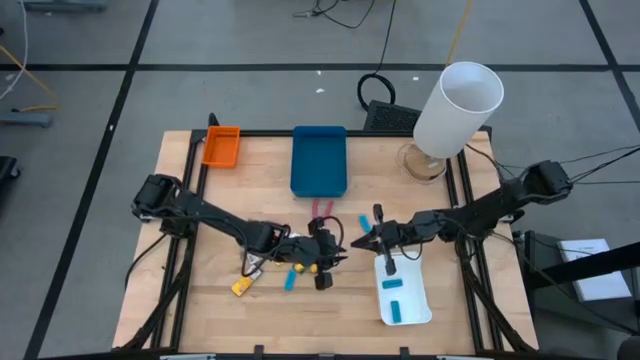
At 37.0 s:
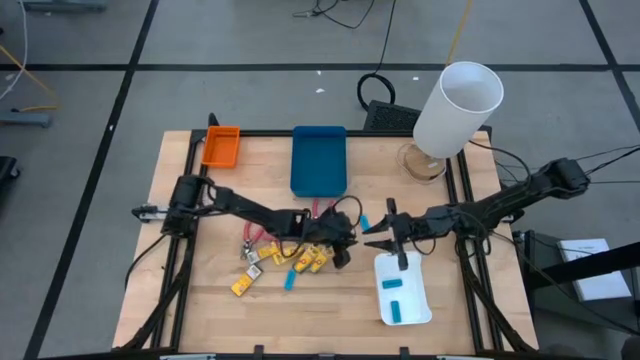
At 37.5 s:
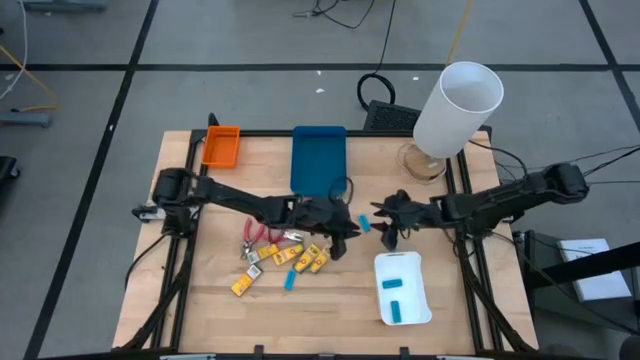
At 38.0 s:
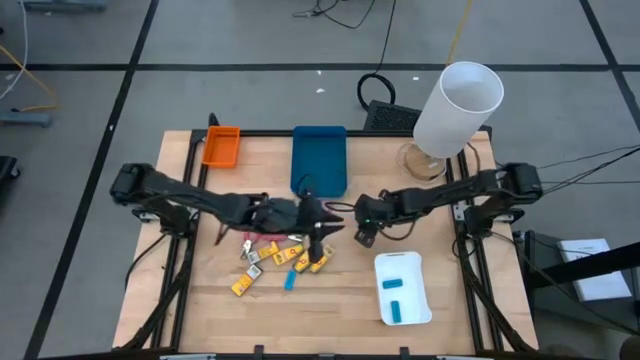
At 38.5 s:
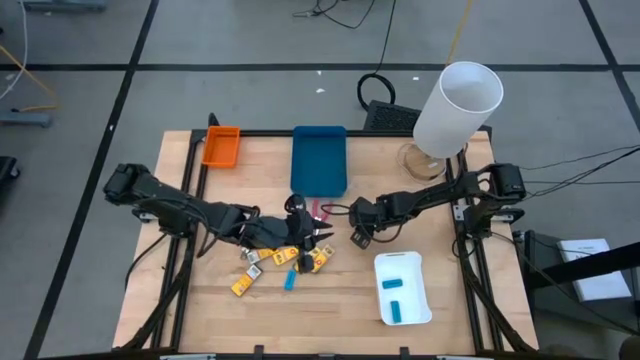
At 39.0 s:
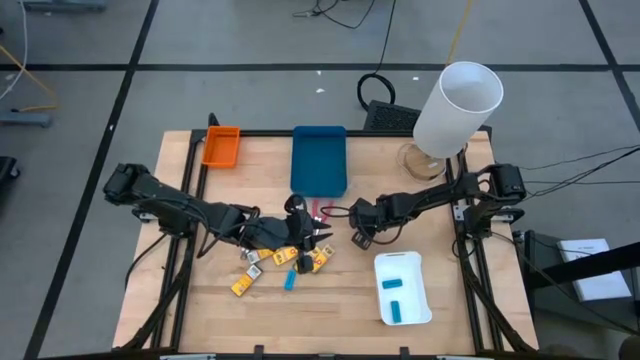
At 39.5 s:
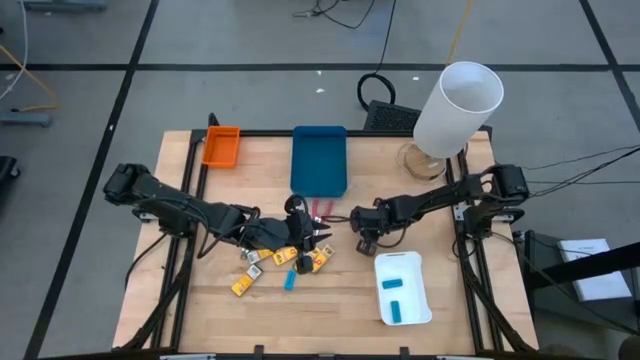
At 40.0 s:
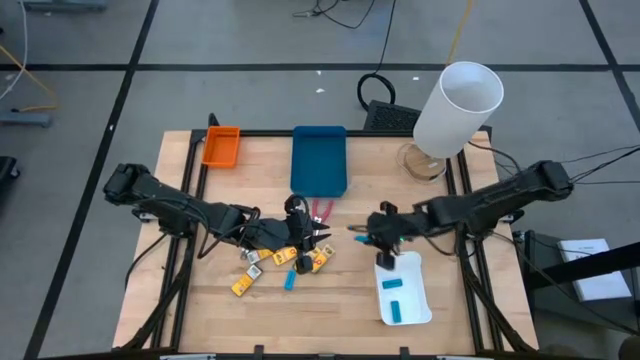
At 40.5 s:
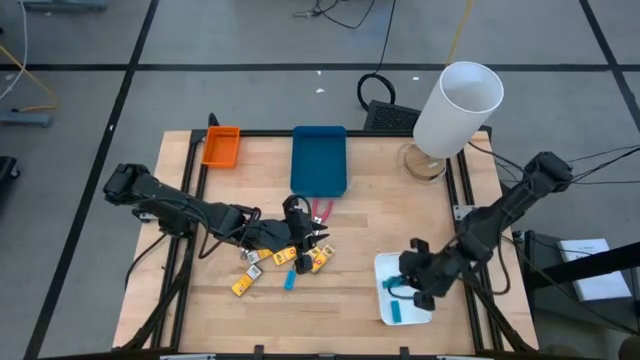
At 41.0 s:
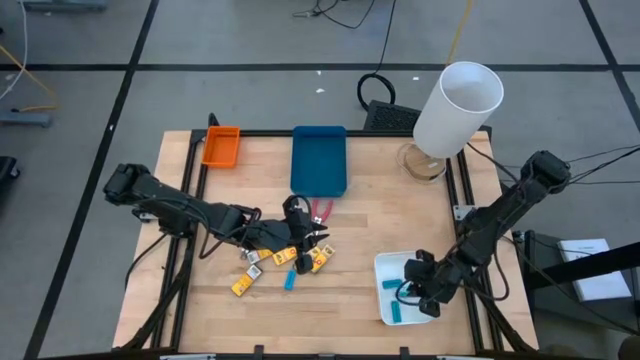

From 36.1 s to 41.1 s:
Task: Pick & Place School Supplies
Put the blue eraser into the white bin

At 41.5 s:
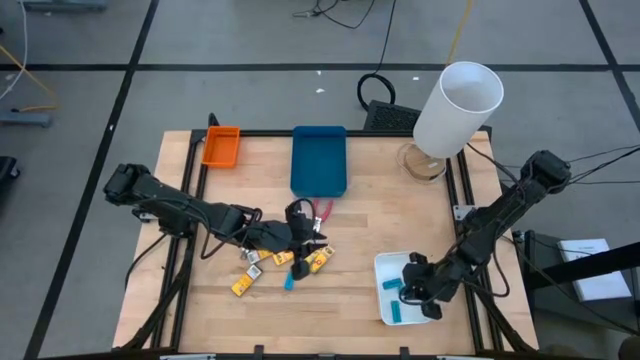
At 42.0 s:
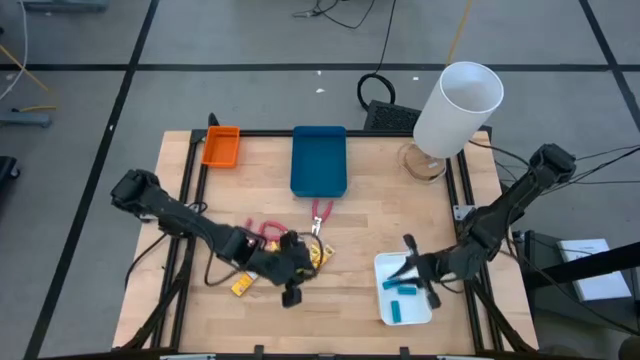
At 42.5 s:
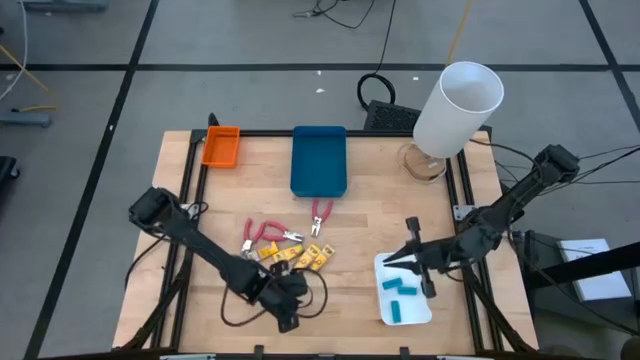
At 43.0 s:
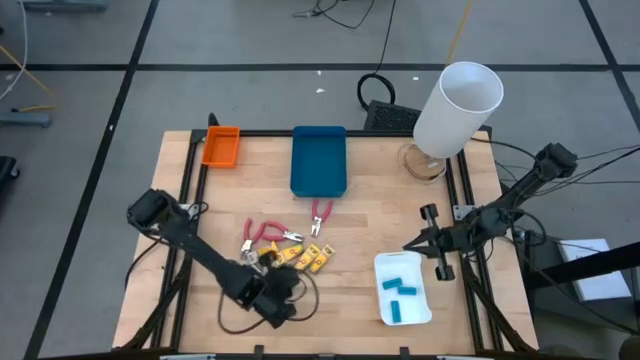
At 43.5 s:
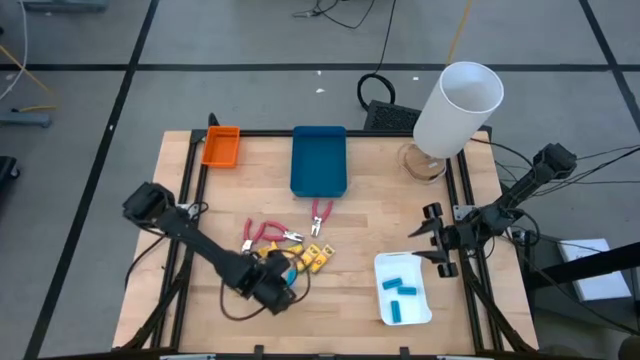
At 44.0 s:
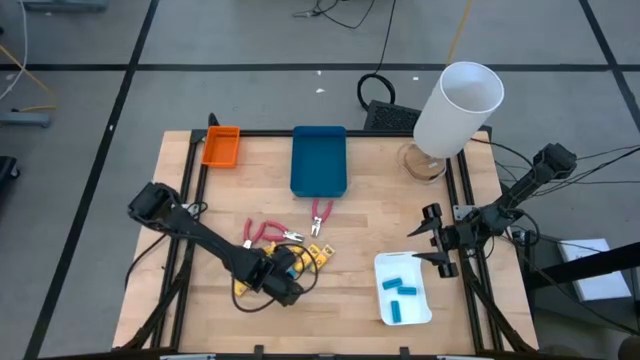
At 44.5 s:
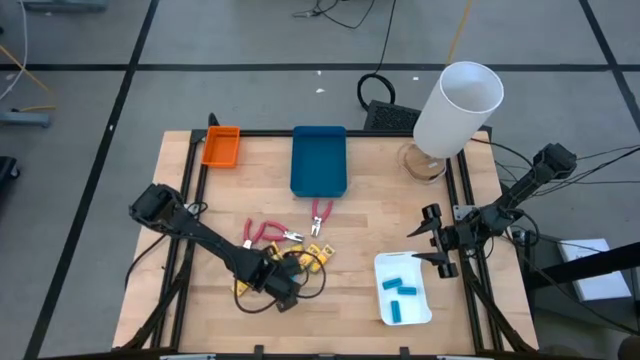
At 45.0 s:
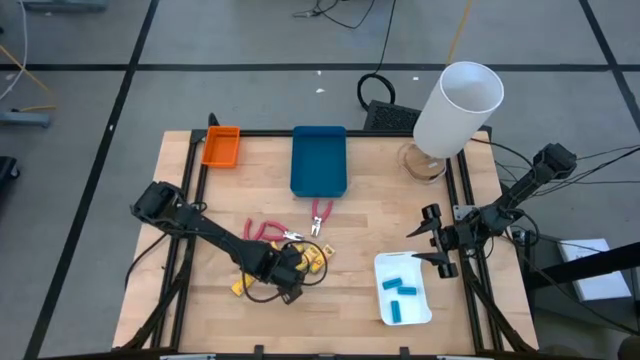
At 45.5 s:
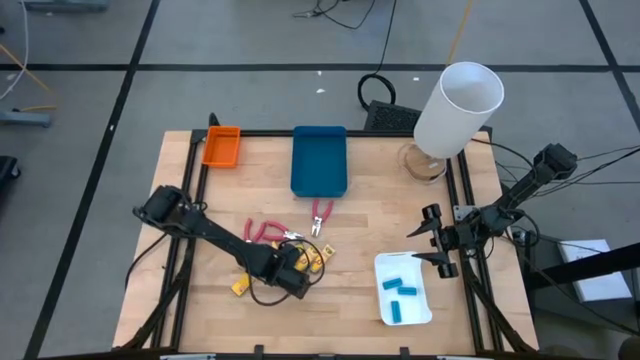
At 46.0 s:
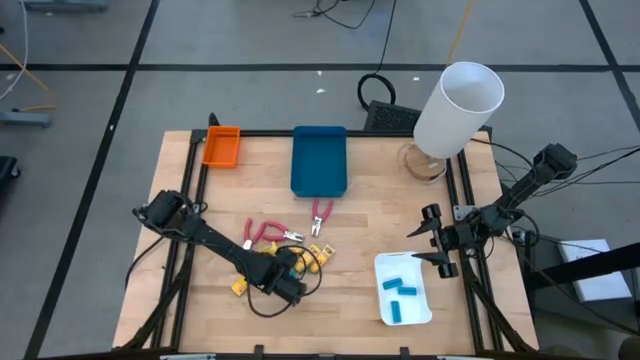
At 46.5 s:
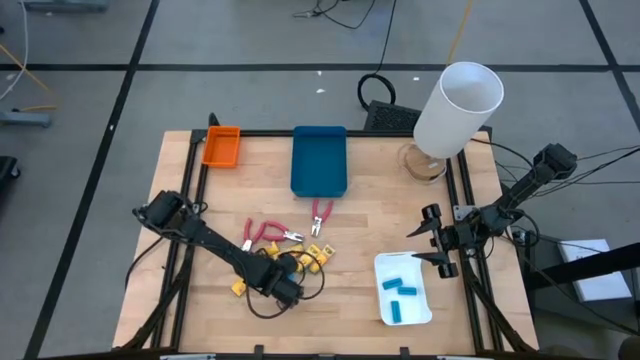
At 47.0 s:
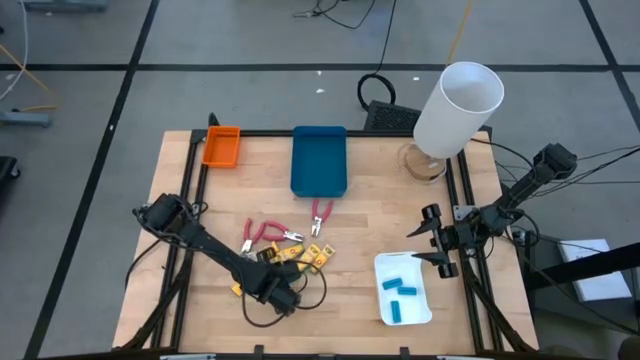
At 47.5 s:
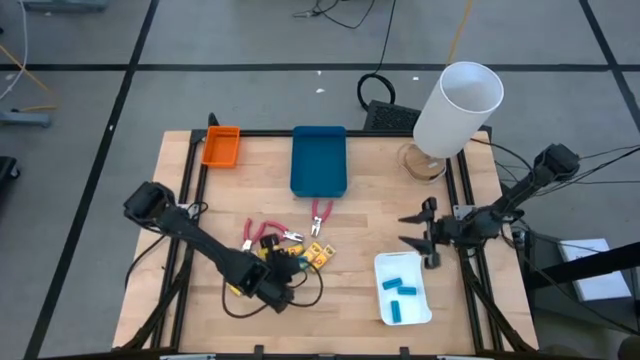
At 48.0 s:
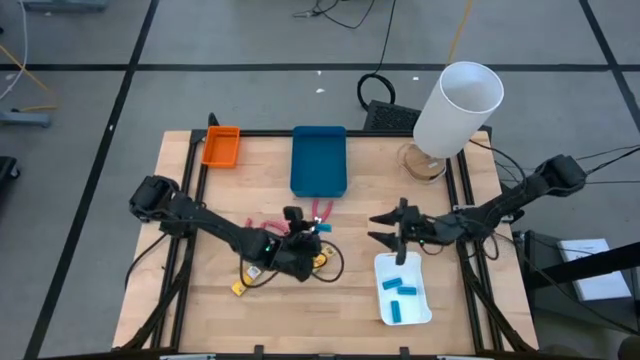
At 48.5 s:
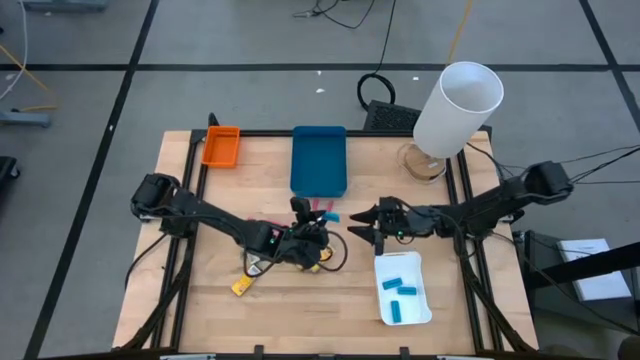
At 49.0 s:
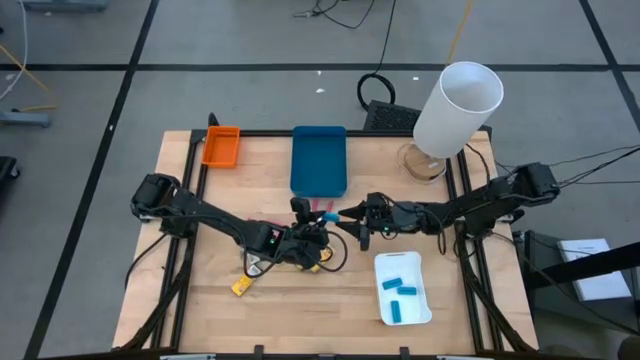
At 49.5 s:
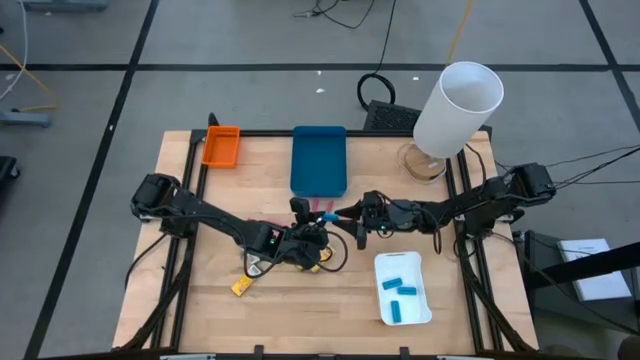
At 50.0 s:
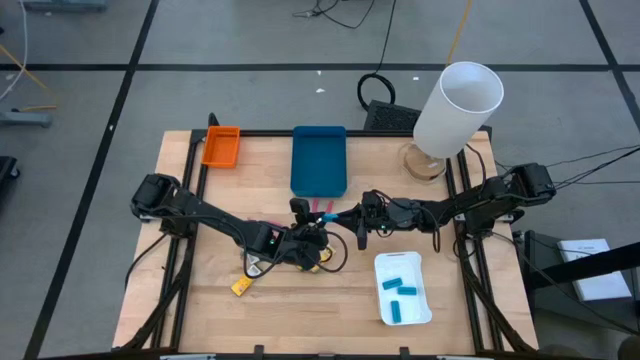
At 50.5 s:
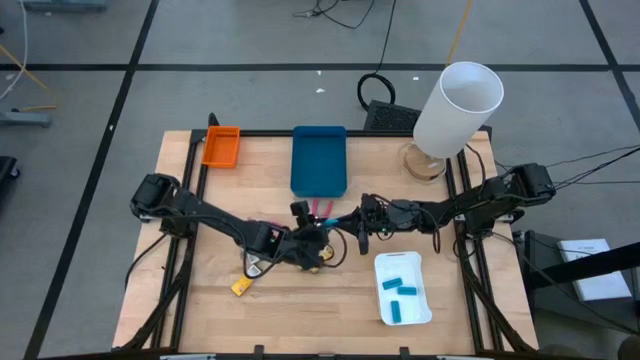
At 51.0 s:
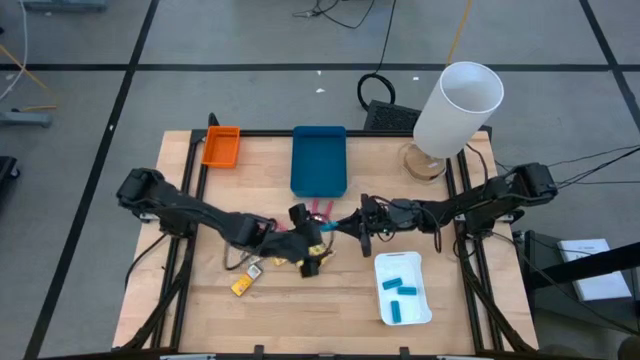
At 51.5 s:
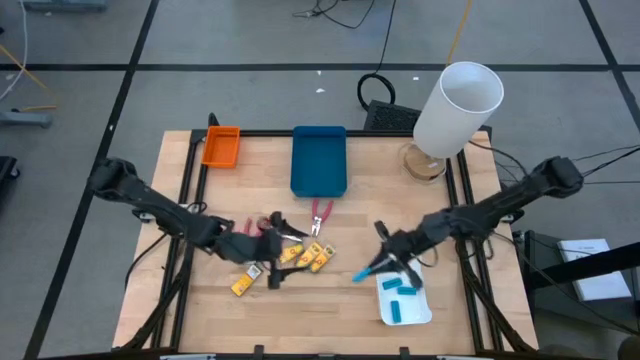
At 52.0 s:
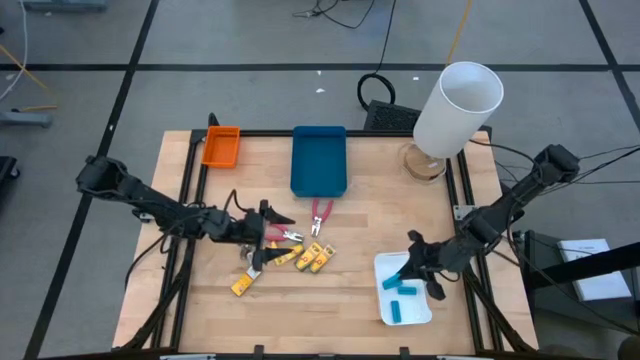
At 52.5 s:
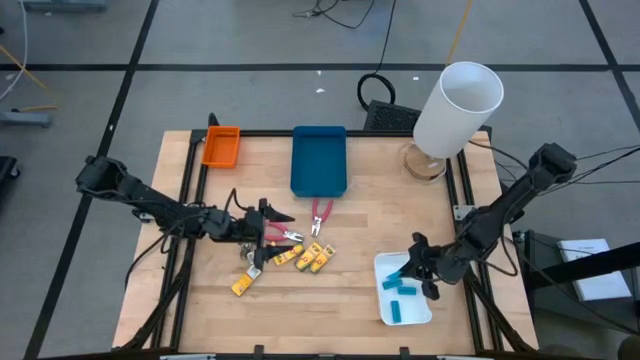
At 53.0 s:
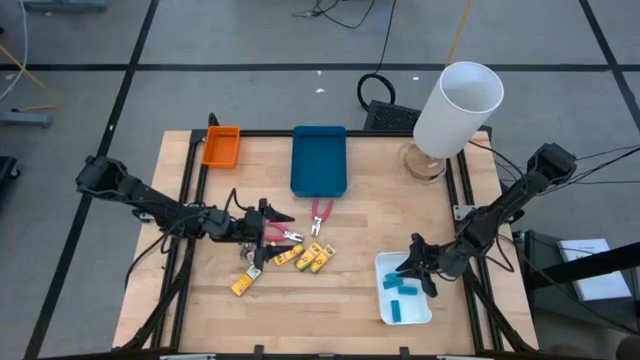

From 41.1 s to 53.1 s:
Put the blue eraser into the white bin

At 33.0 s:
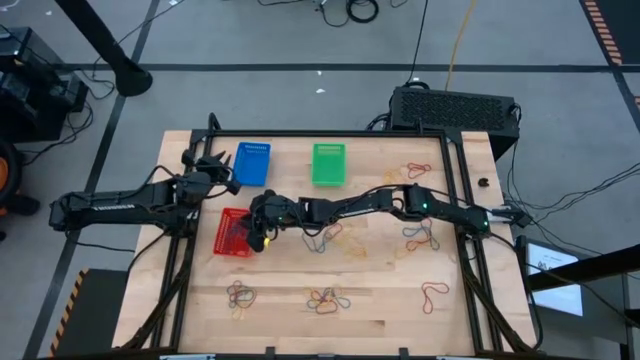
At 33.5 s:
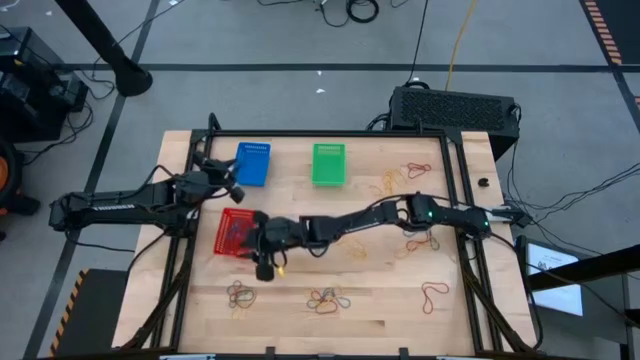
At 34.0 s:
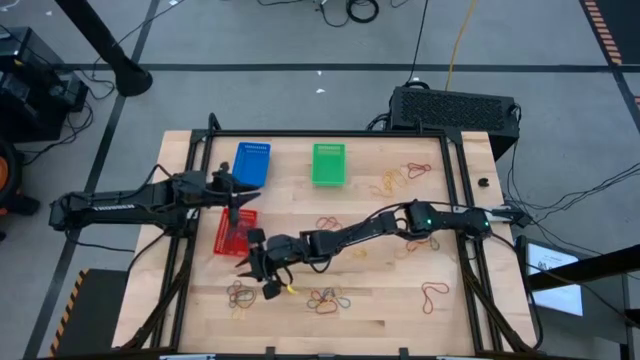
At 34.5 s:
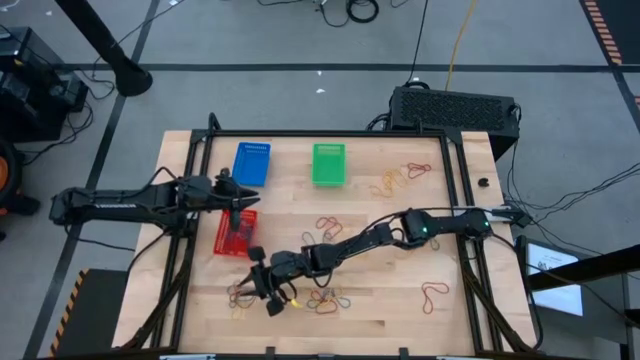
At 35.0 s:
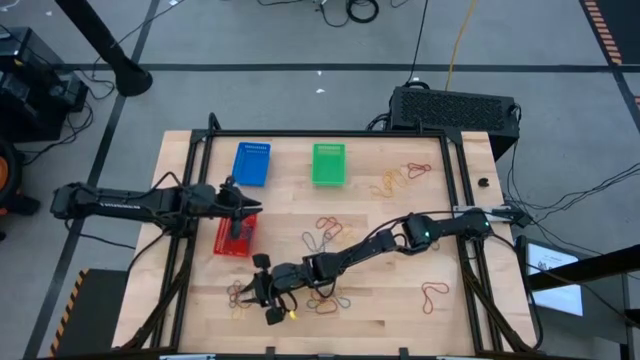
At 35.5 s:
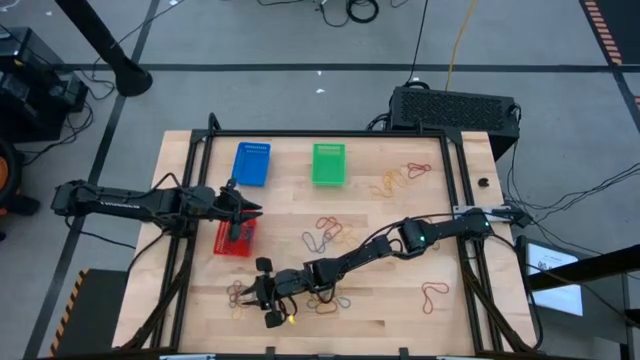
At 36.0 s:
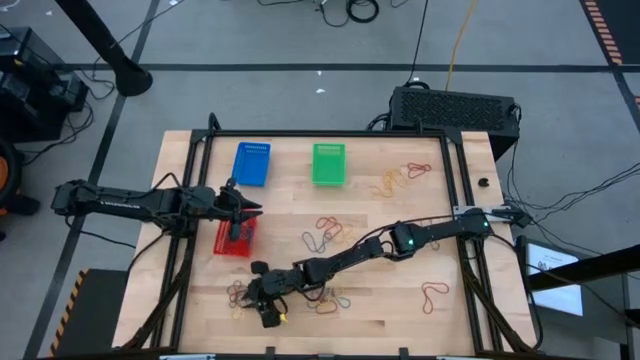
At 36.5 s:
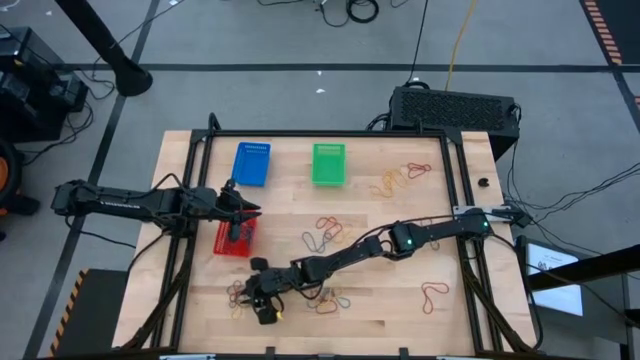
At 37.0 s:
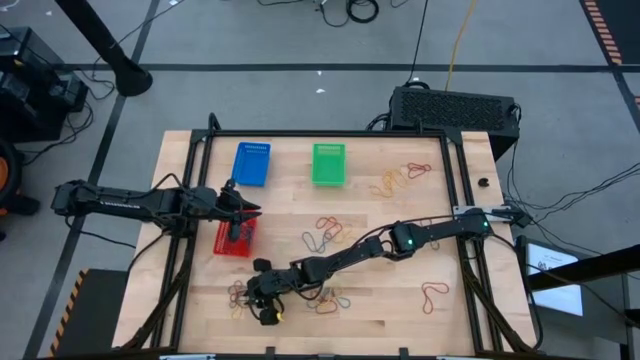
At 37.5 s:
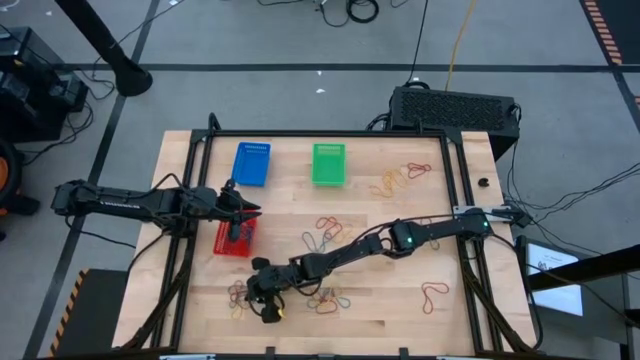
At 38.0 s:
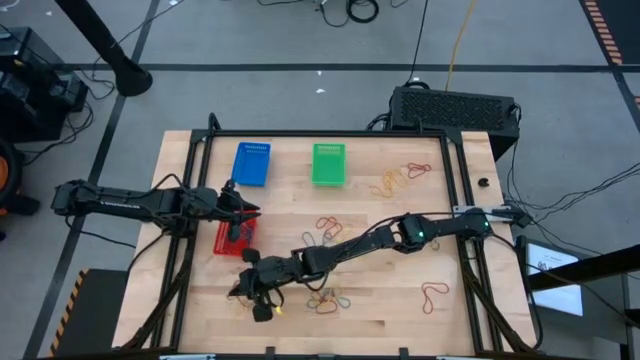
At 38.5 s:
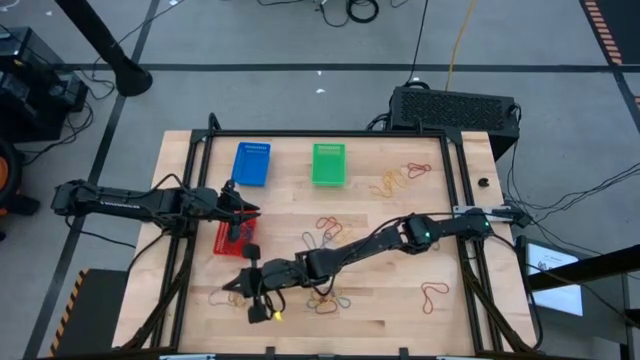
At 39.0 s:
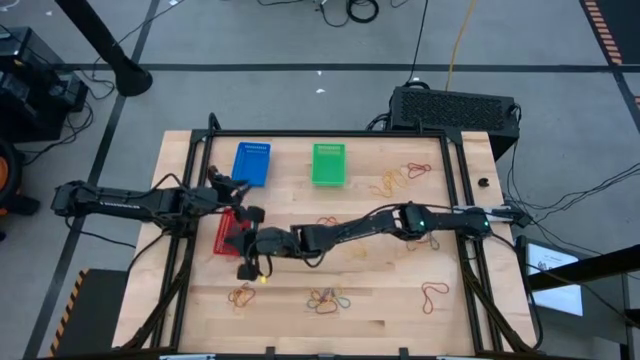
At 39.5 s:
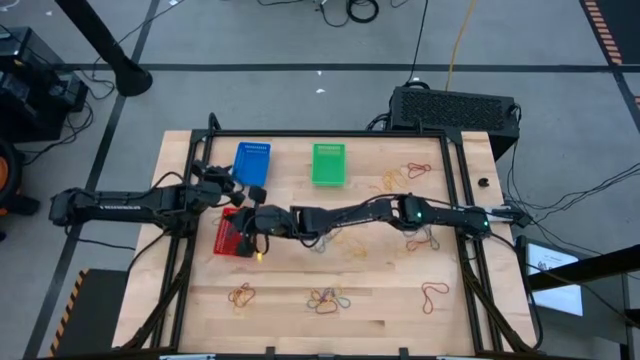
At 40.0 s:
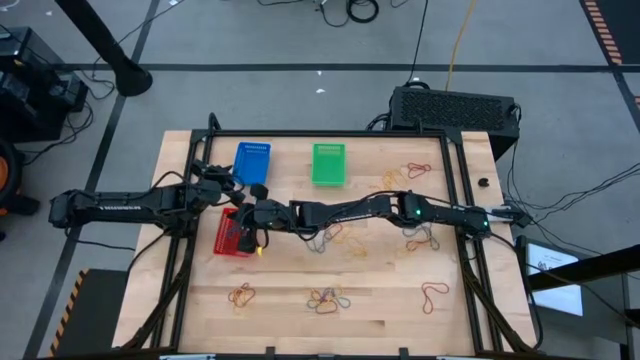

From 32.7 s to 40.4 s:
Task: Sort rubber bands into baskets
Put the blue rubber band into the red basket
